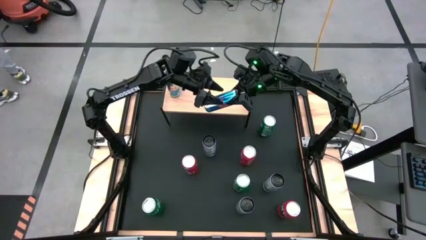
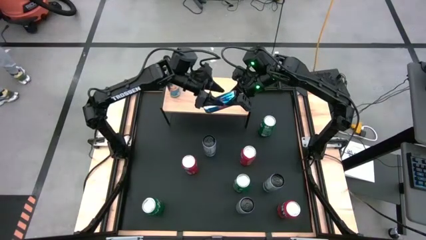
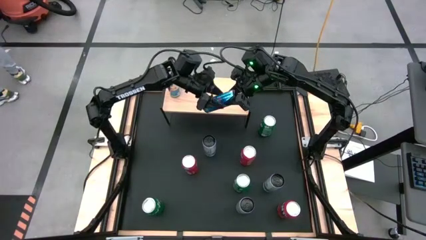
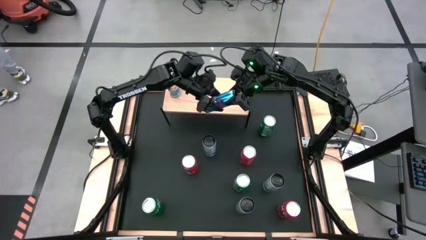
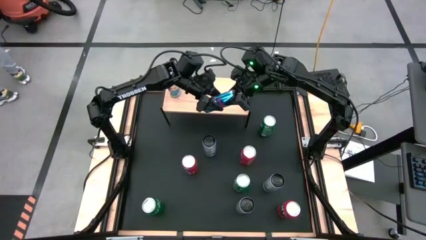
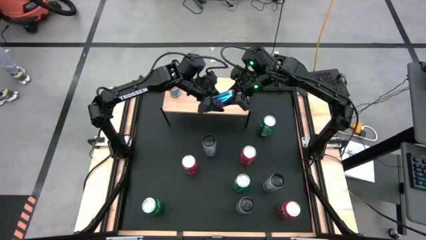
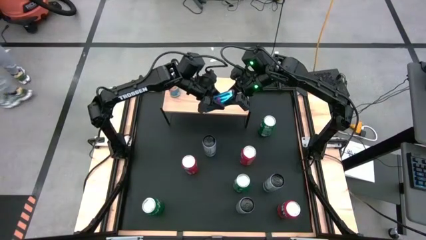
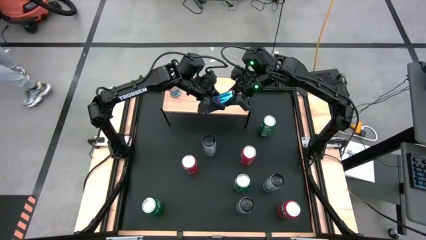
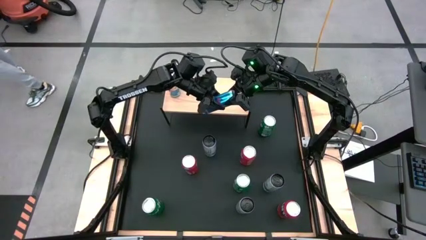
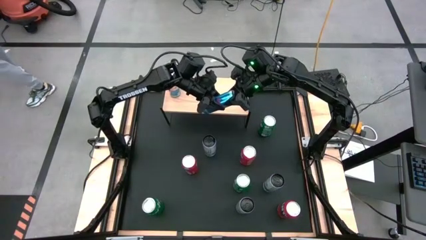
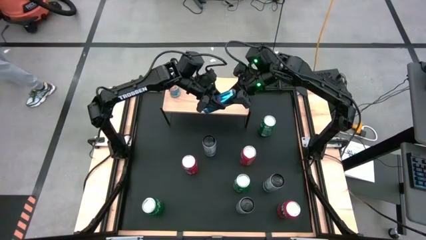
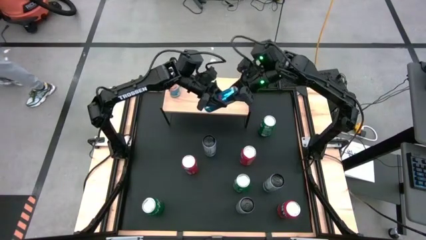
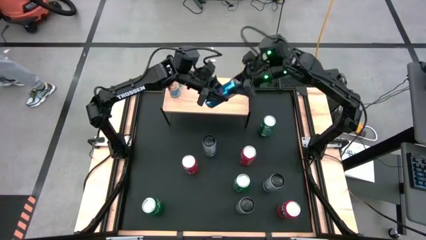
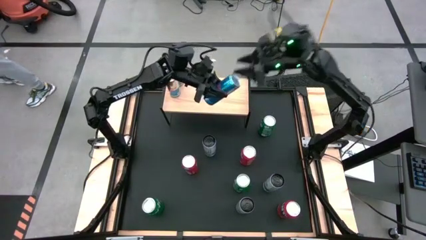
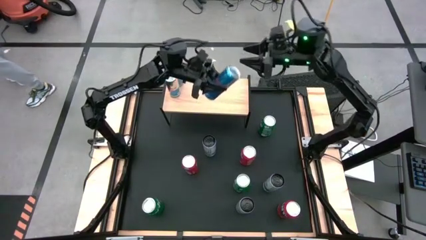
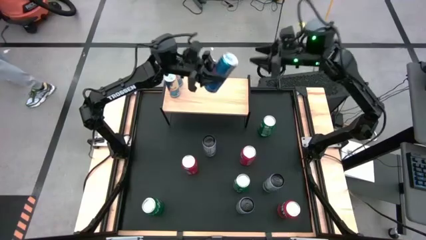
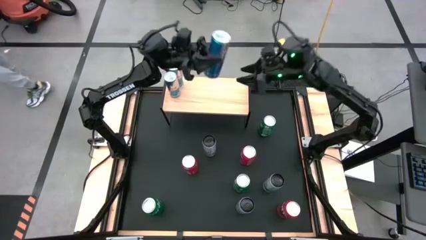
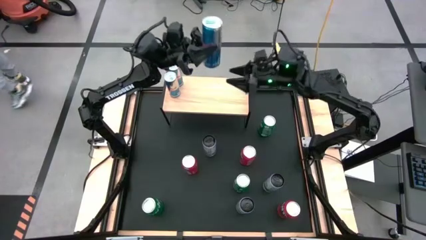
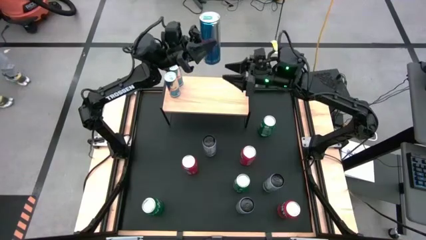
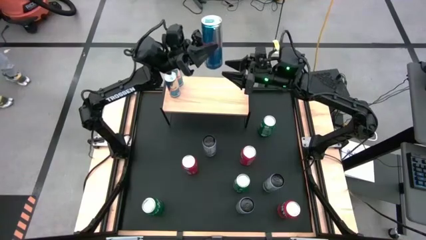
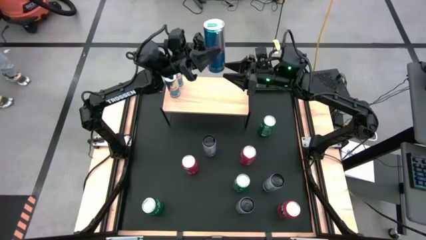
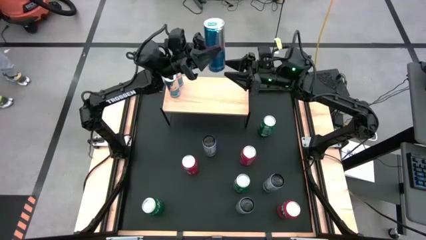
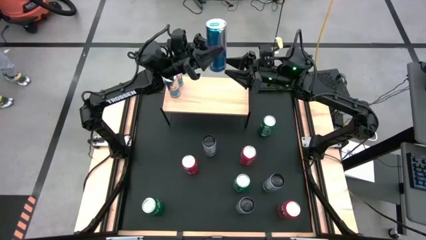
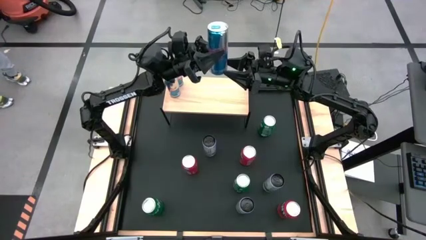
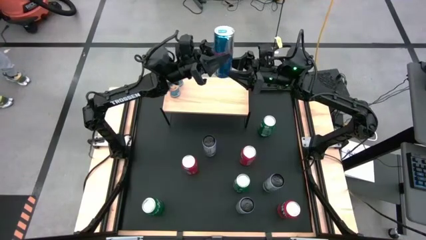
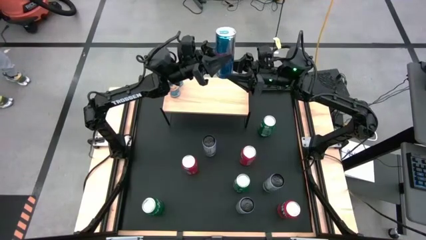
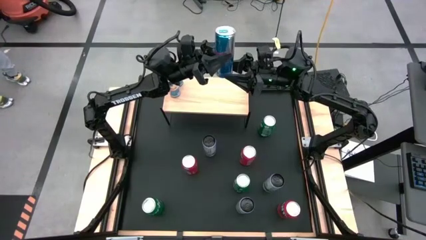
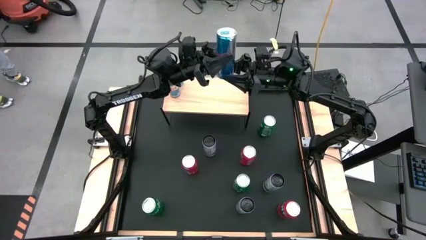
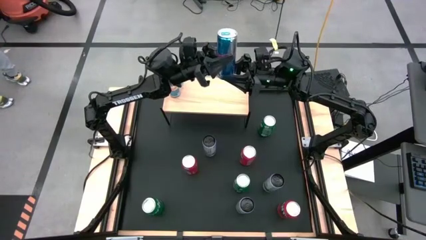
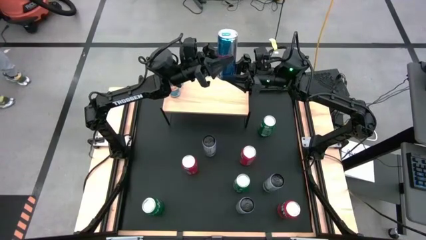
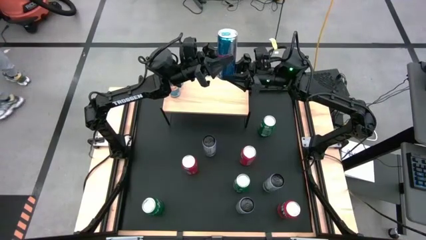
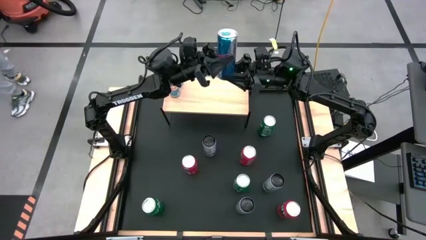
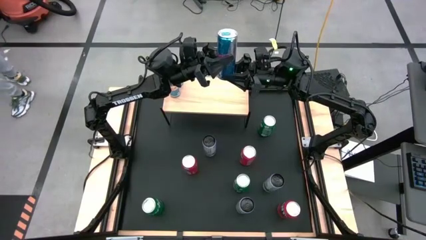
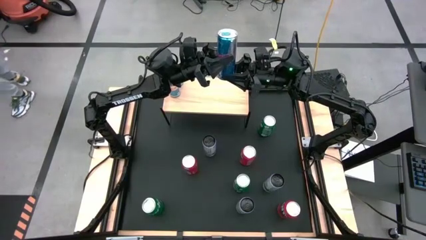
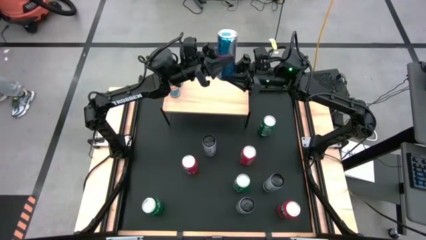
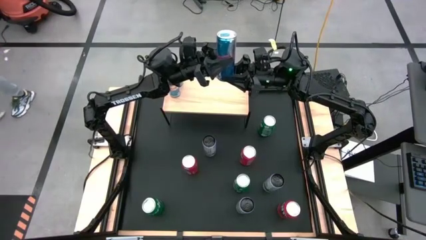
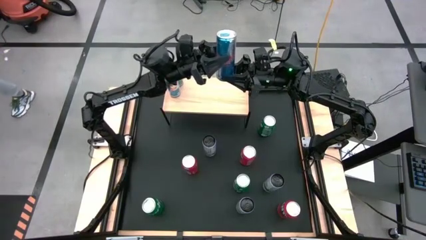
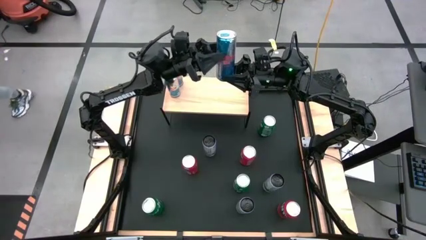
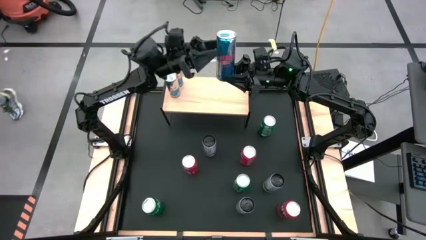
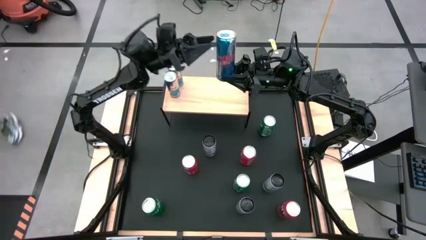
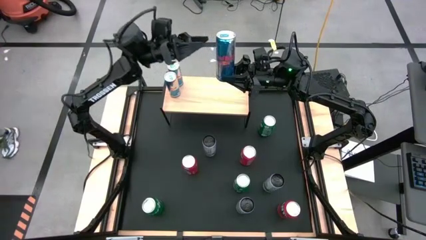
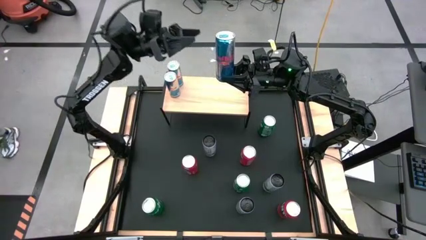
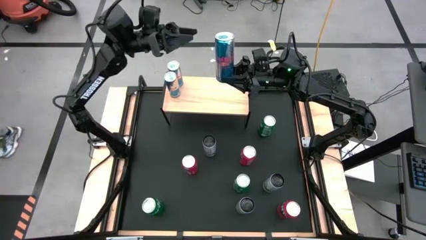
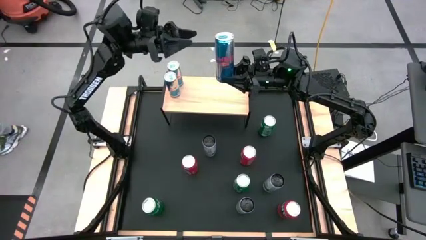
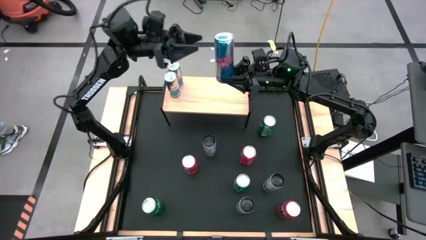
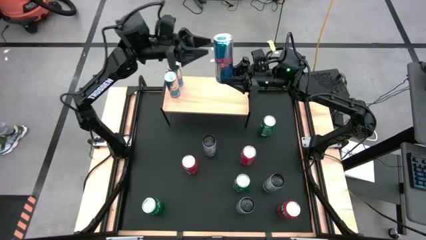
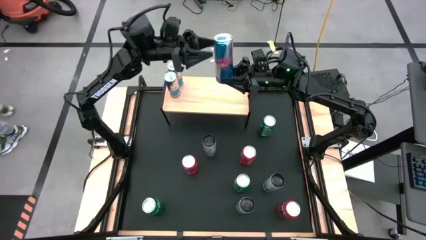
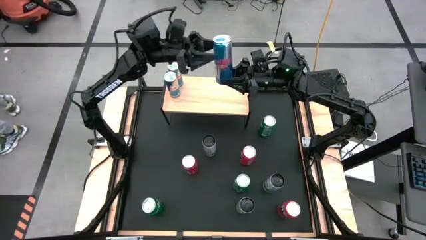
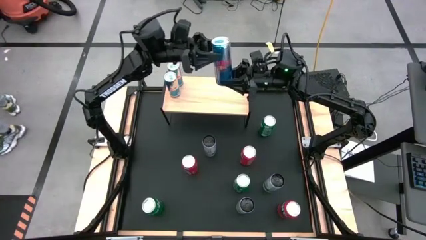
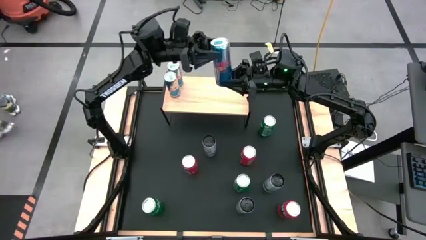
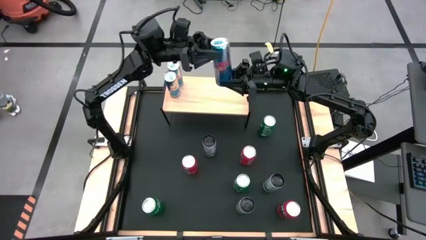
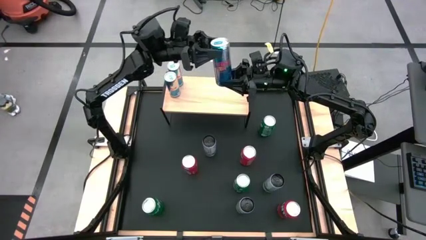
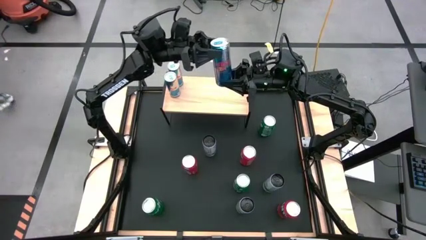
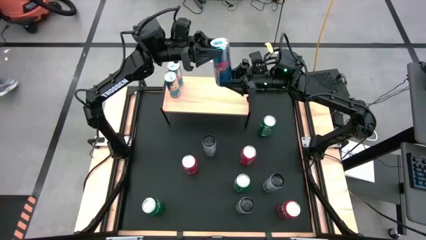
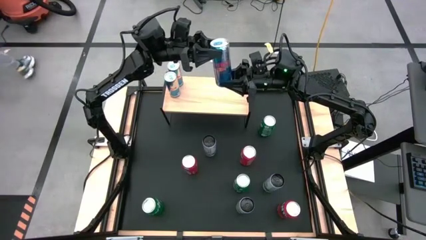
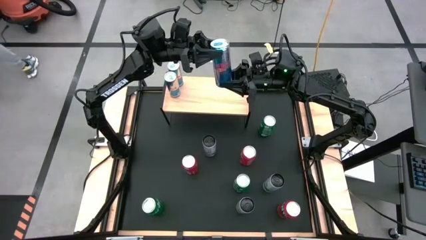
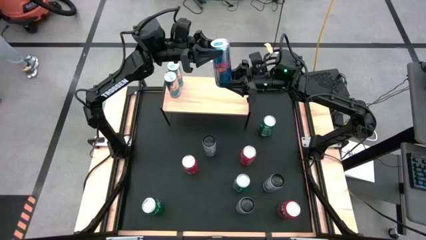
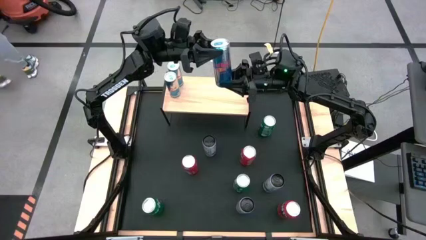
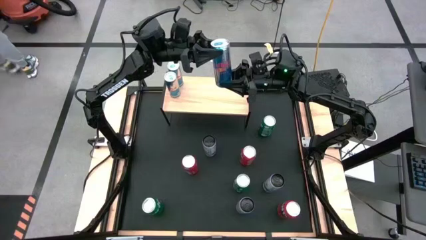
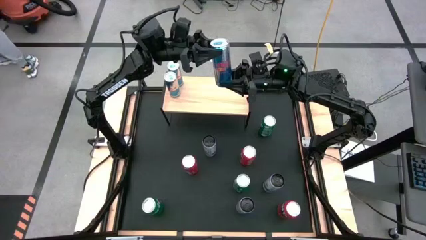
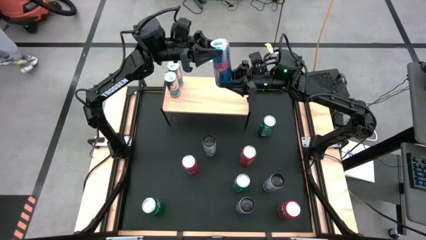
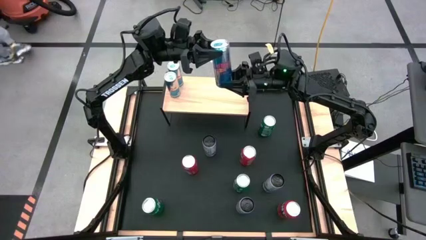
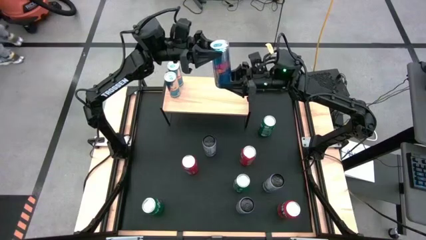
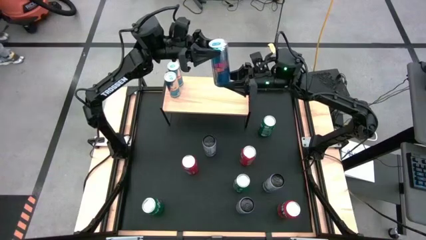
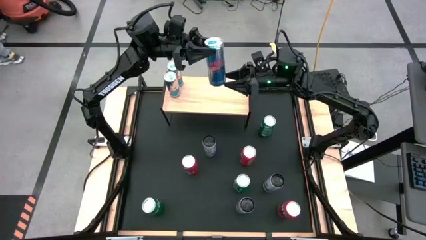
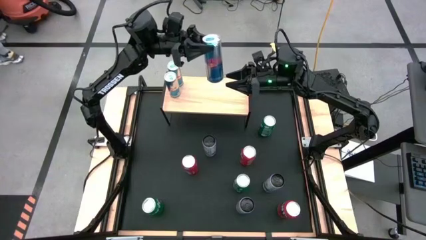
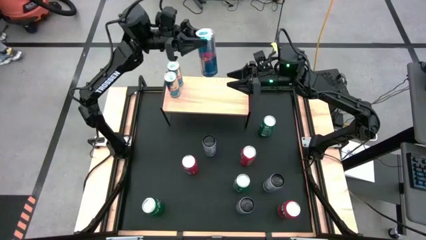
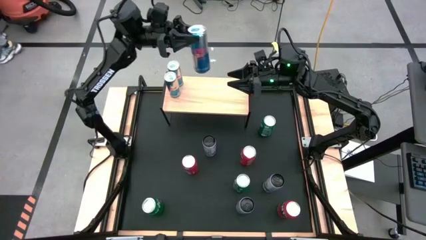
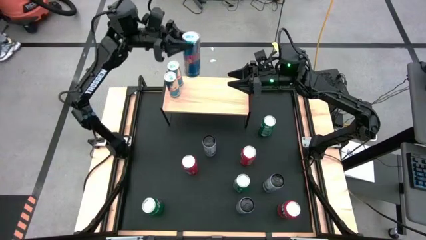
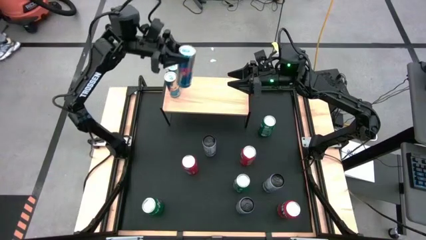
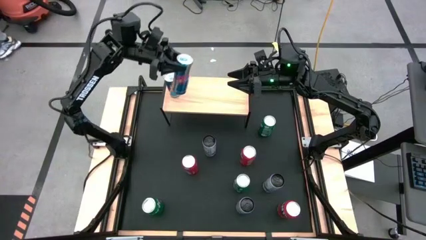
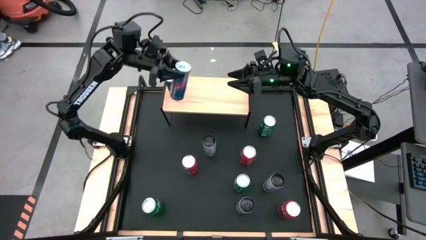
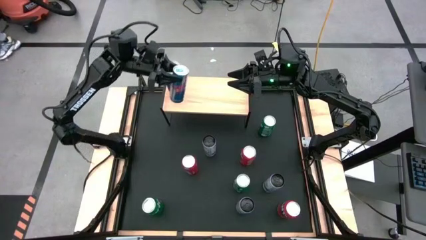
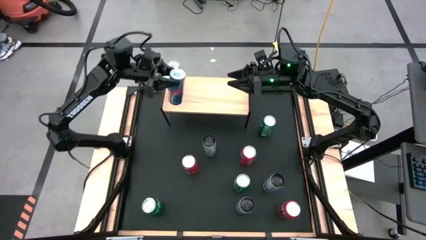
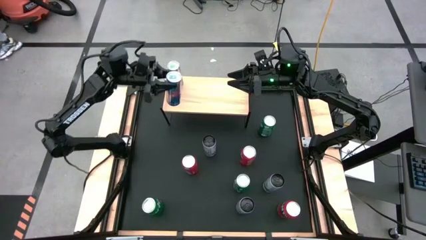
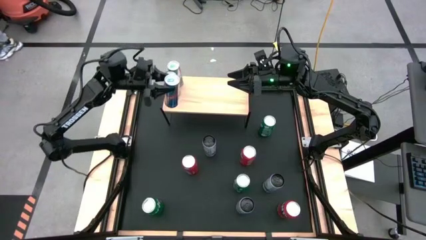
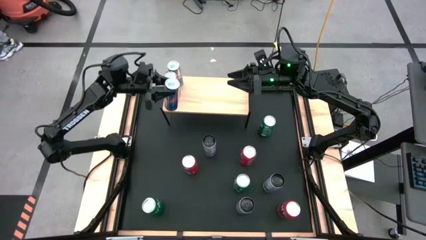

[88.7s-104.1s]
Task: Place canned beverage on shelf
Put the blue soda can on the shelf

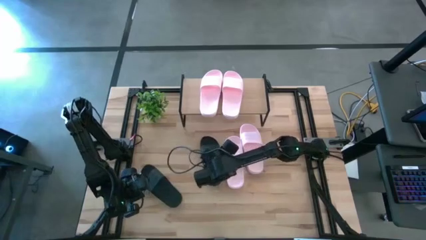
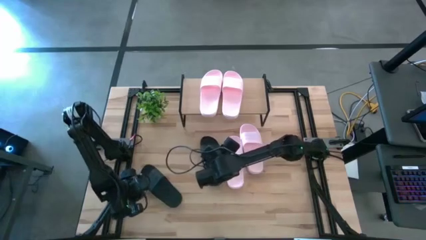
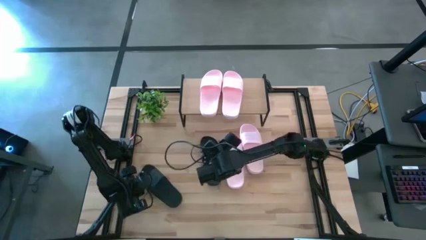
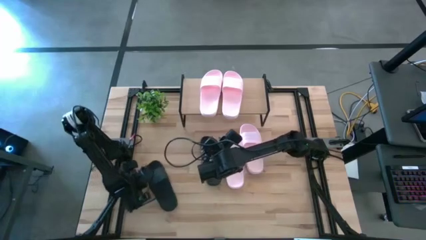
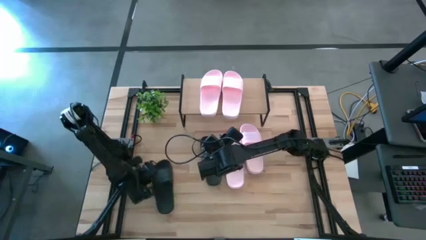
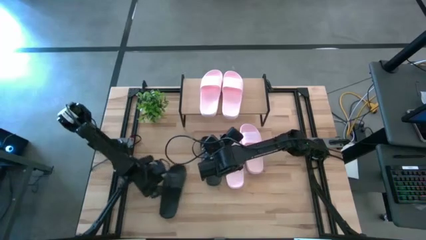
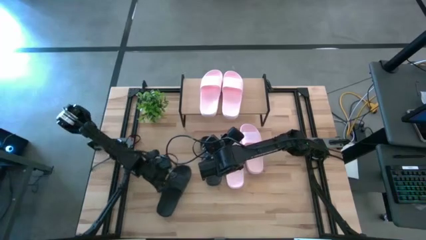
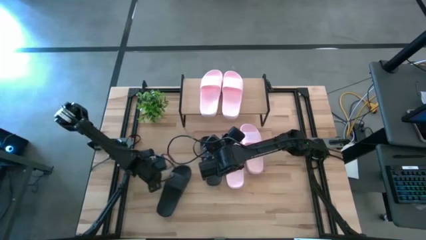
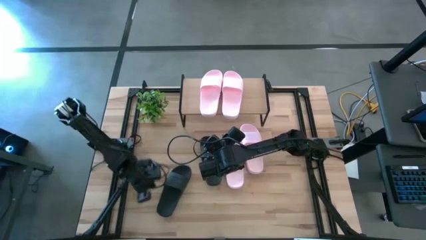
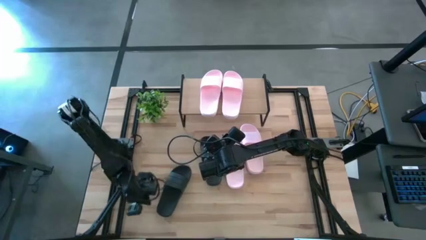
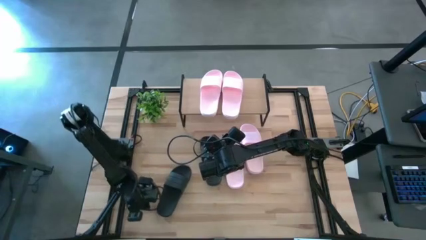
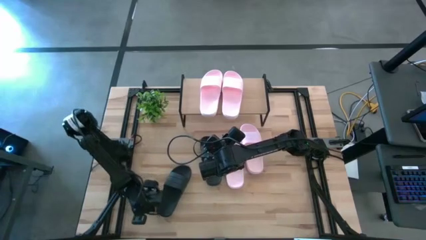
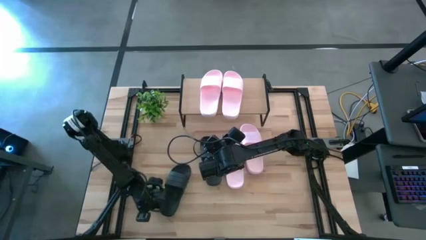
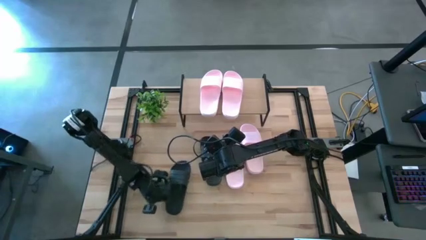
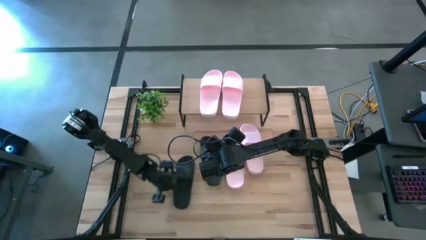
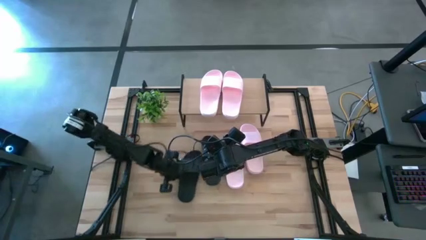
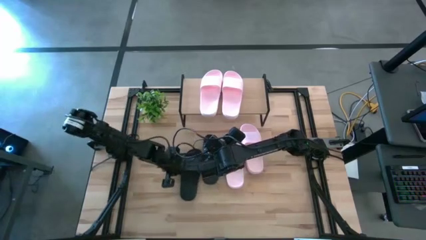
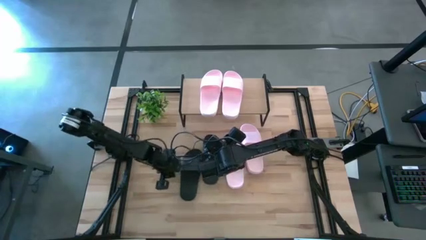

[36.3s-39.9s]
Task: Pick and place slides into the shelf
Move the left black slide beside the right black slide on the table
